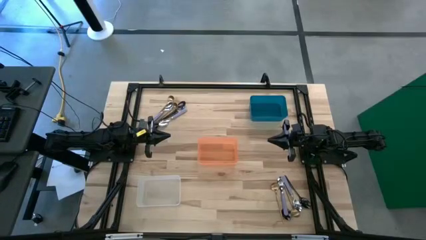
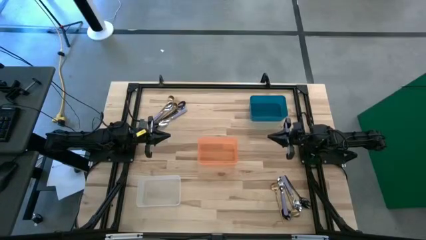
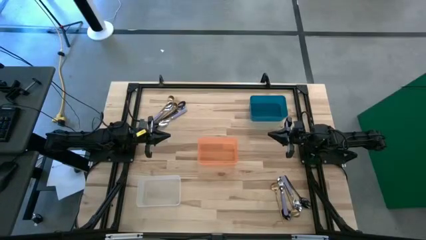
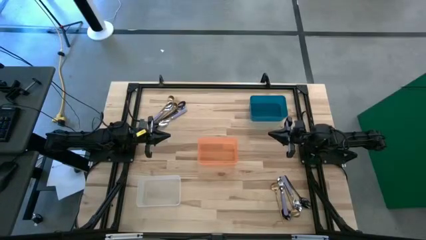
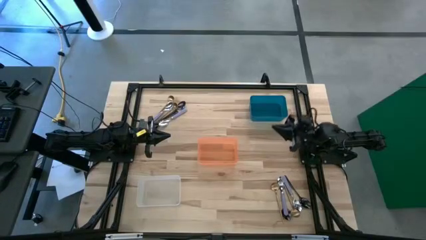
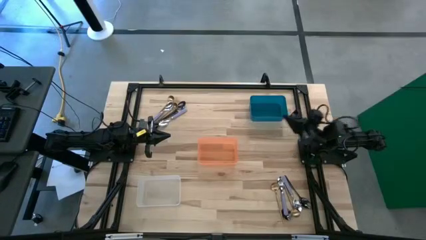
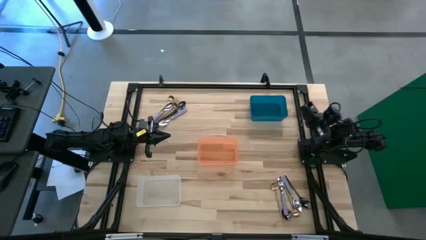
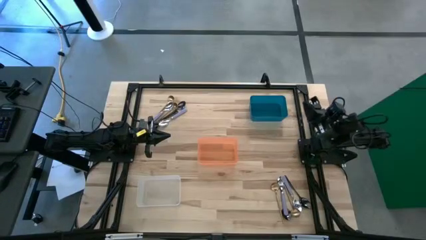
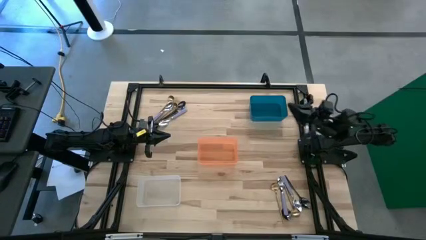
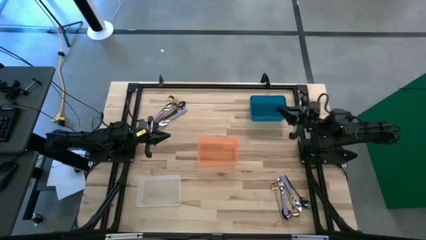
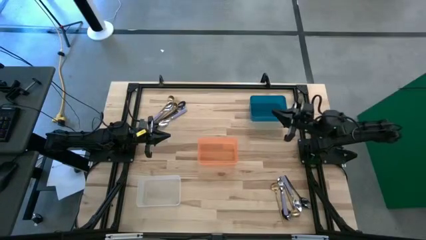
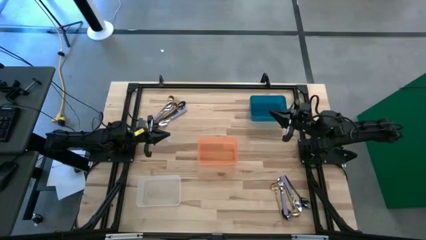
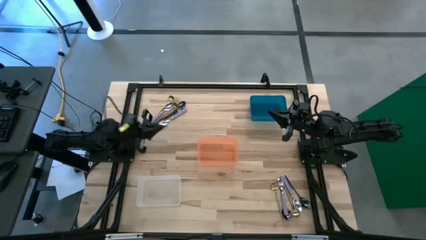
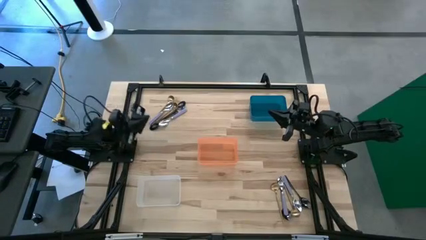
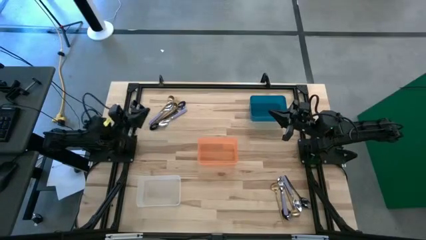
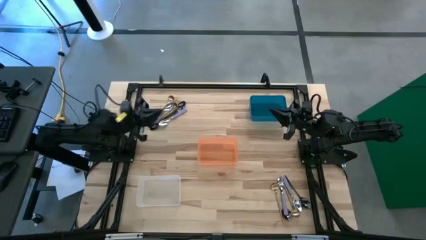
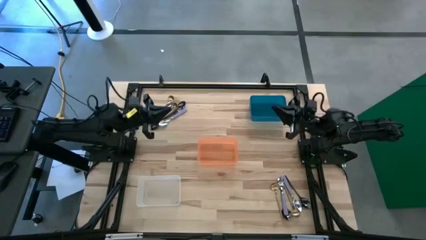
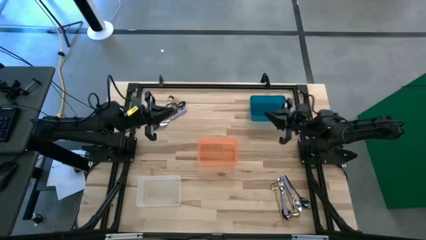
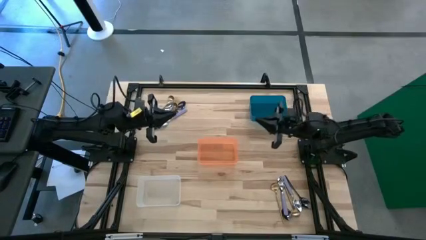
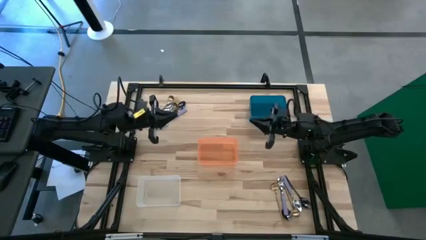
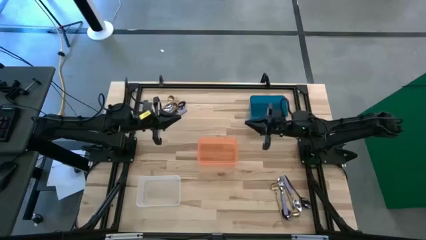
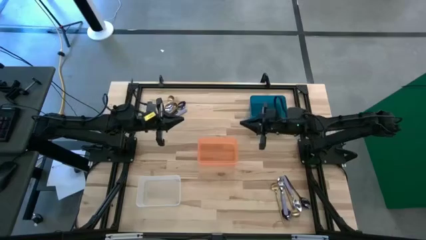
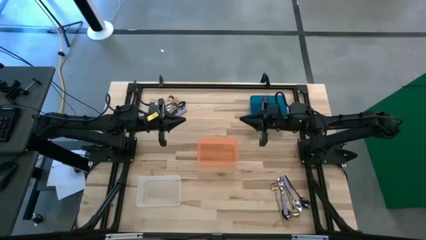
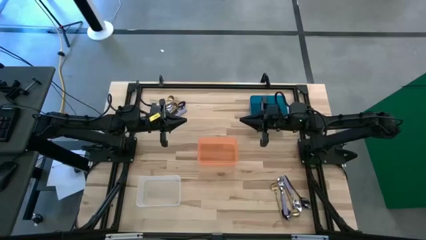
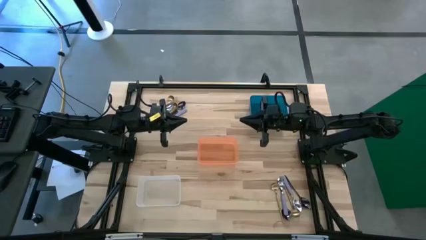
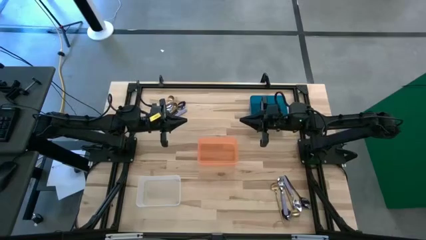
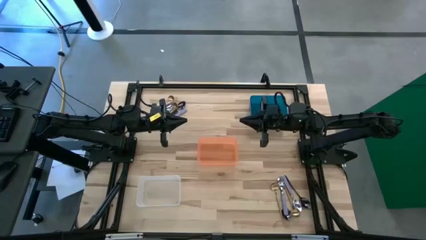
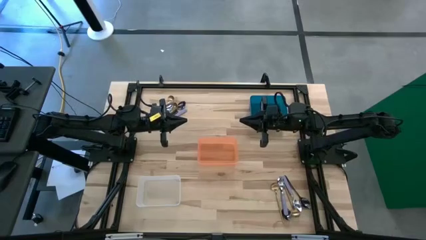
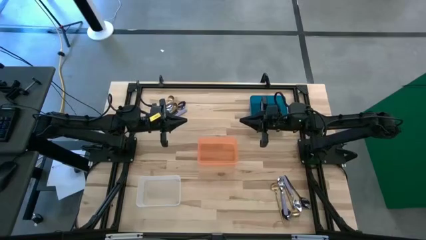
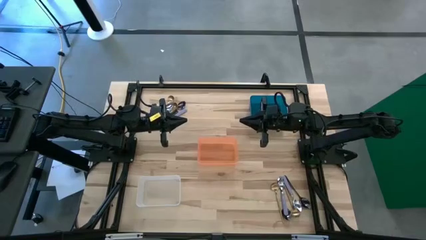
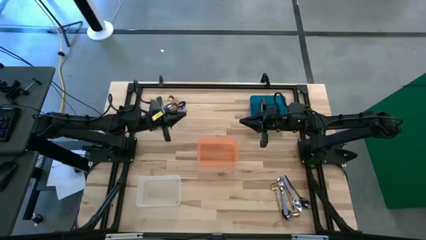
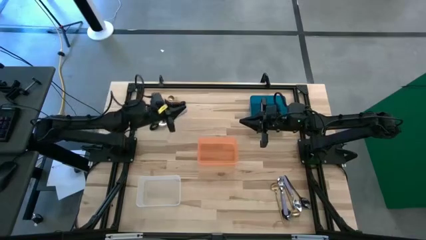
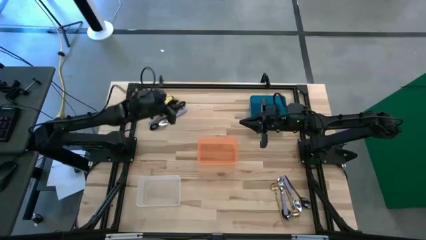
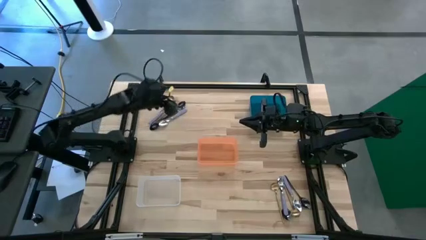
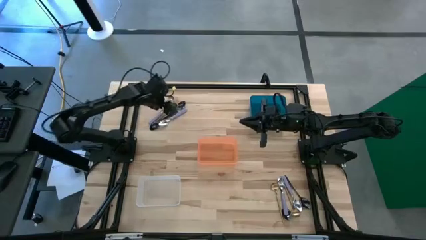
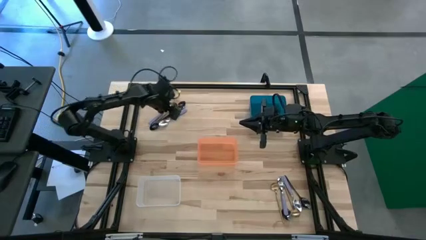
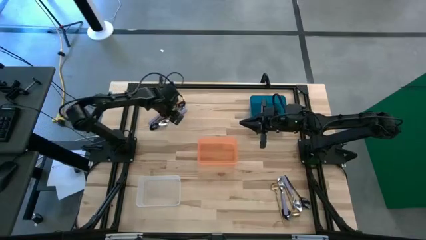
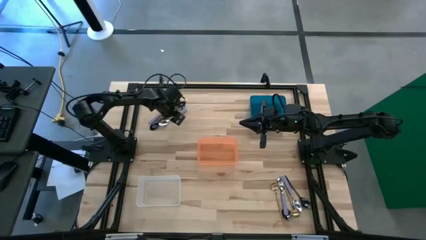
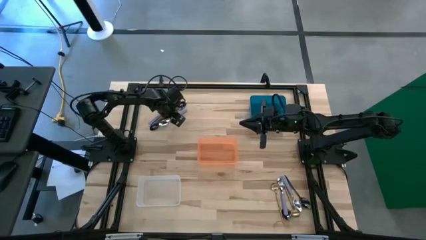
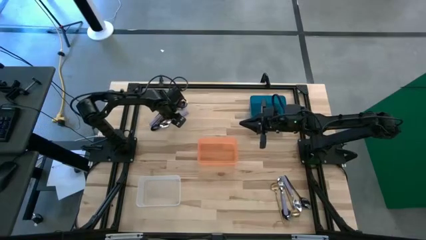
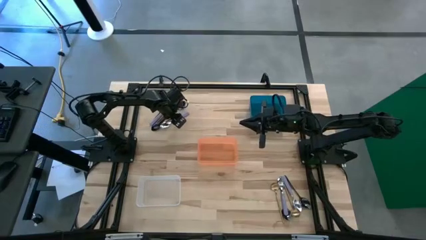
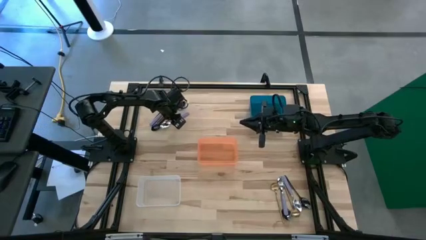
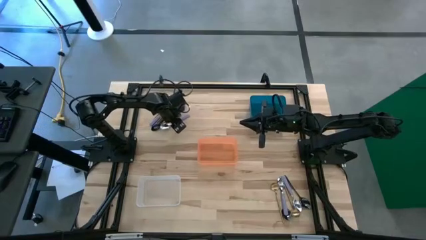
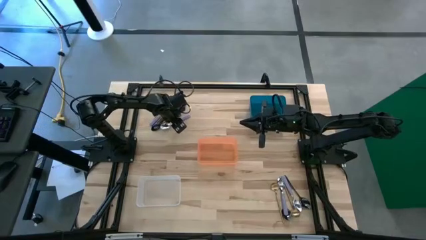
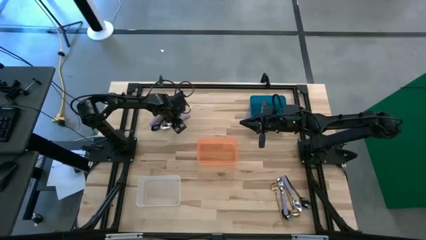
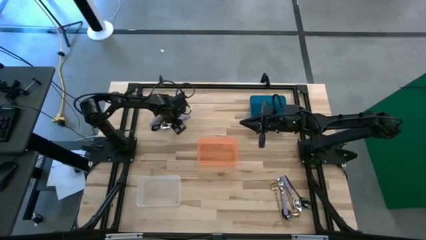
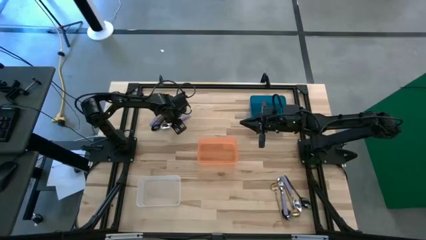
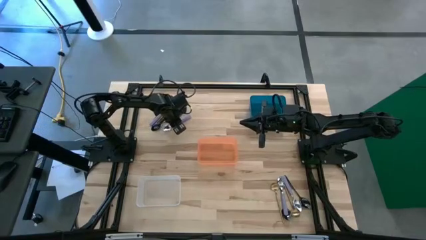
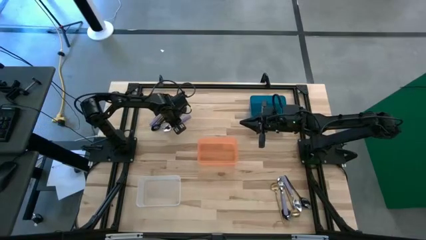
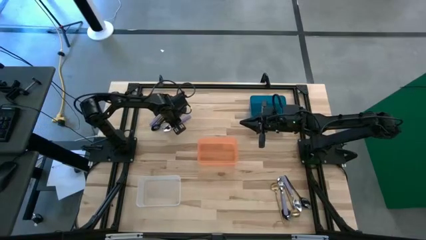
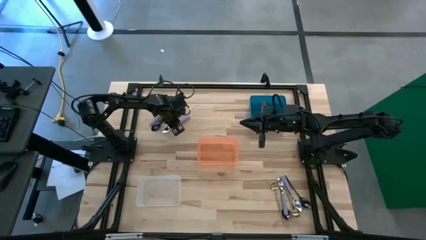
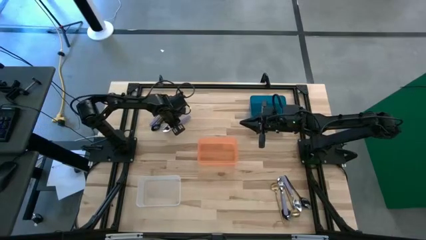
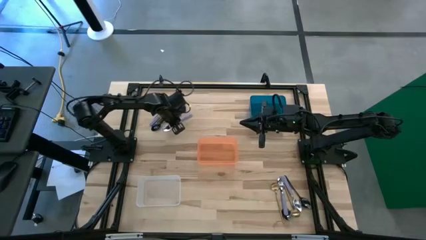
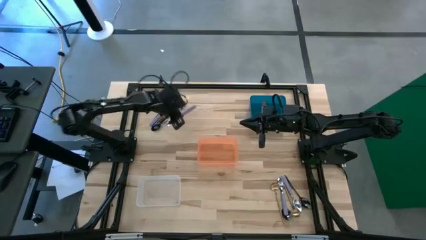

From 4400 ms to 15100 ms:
Task: Sort silverware by color (type)
Put the top right violet spoon into the blue bin

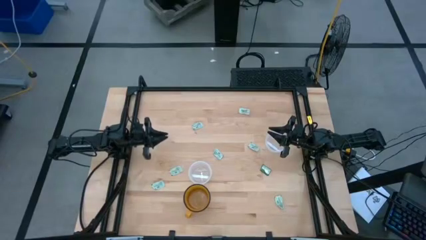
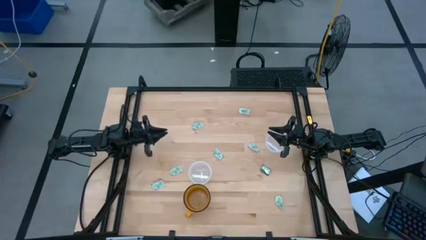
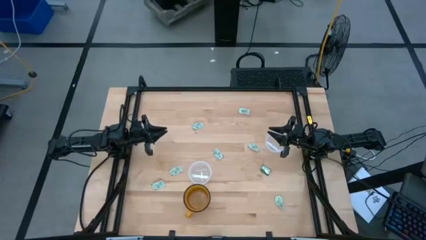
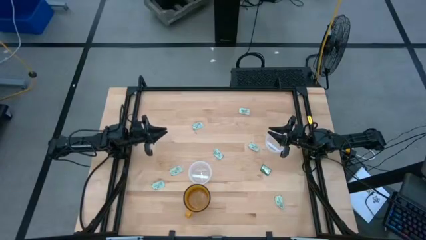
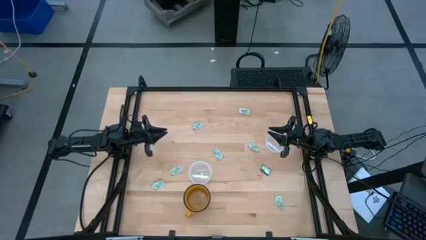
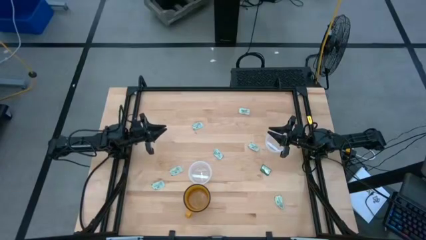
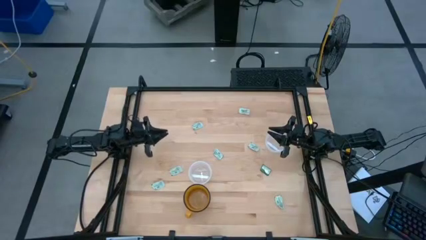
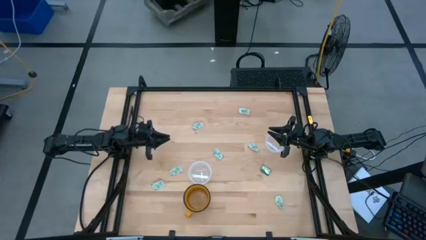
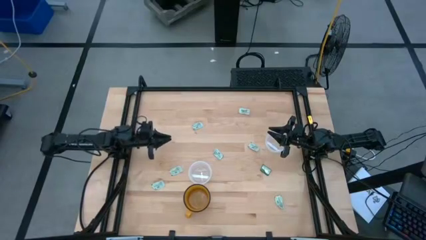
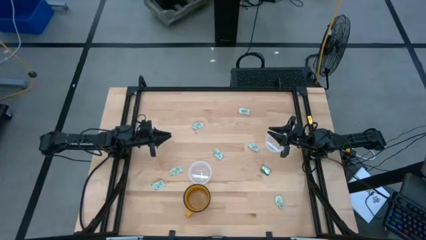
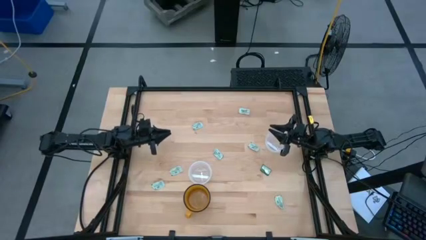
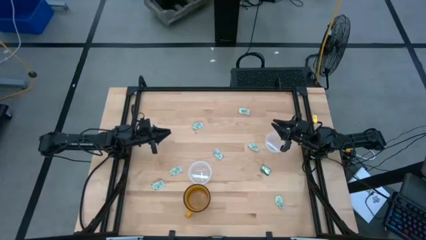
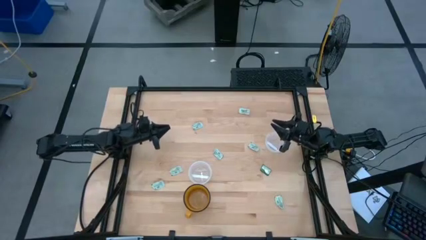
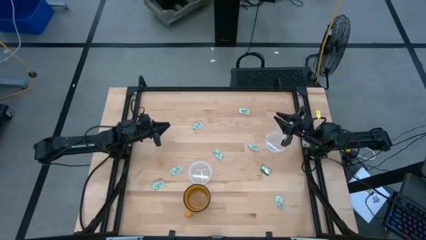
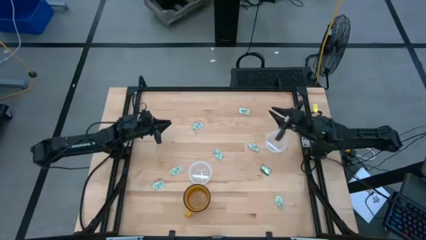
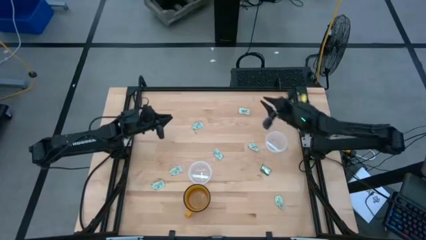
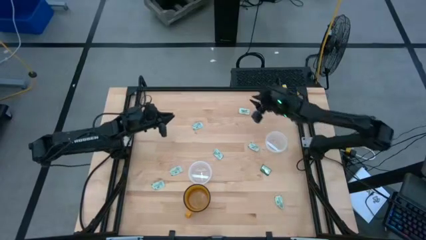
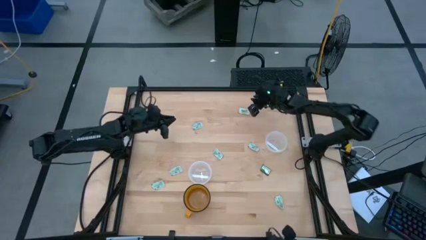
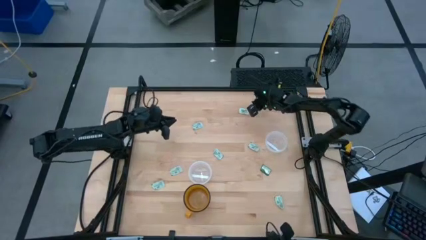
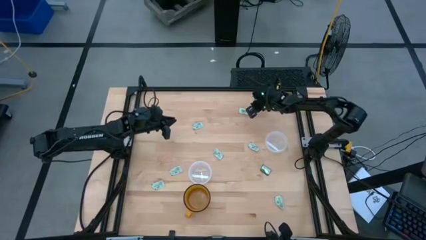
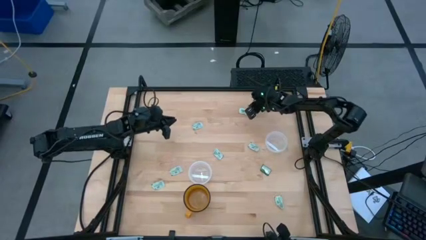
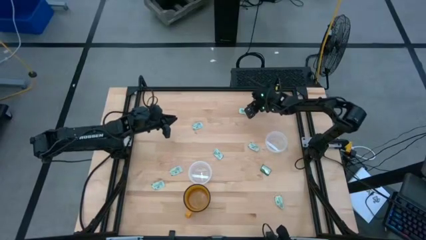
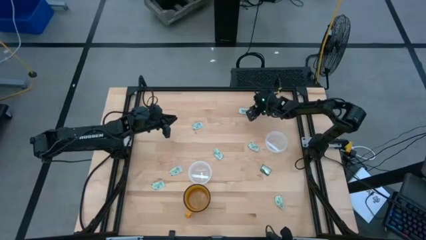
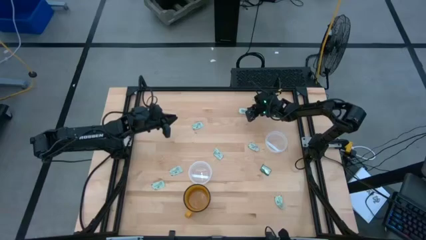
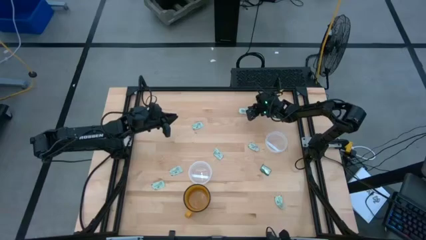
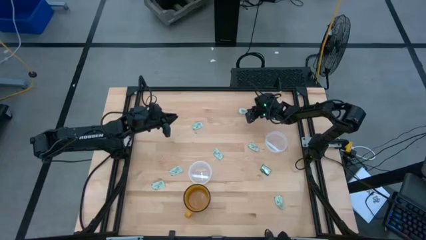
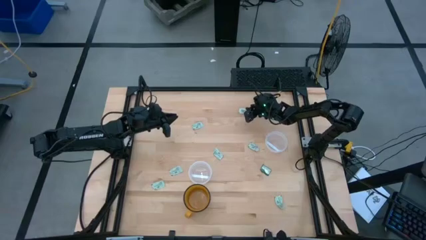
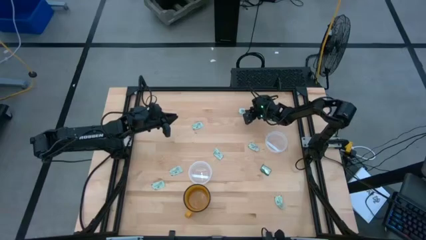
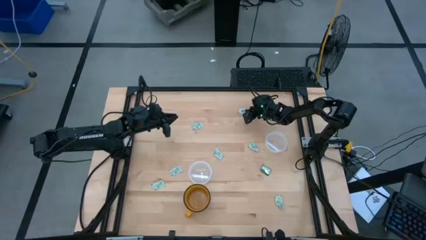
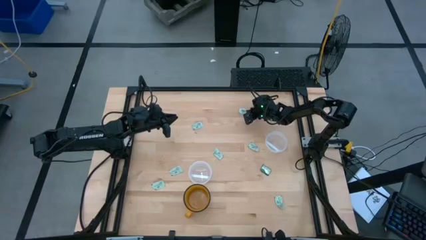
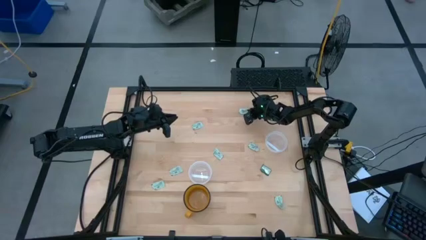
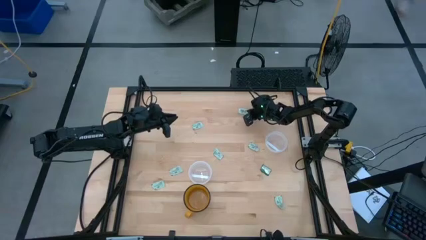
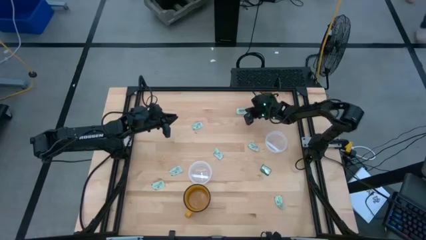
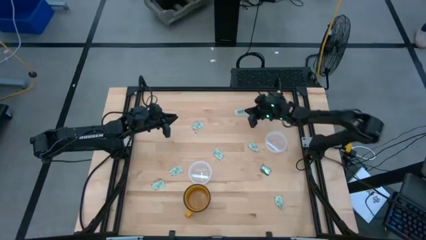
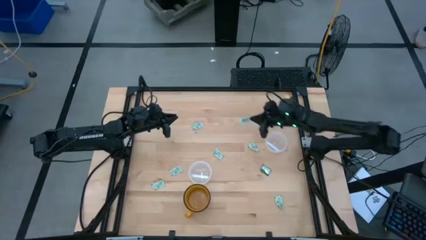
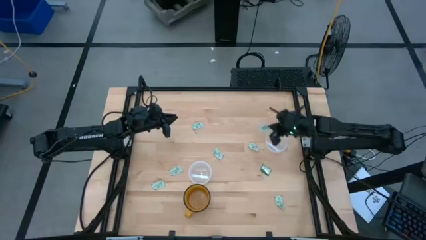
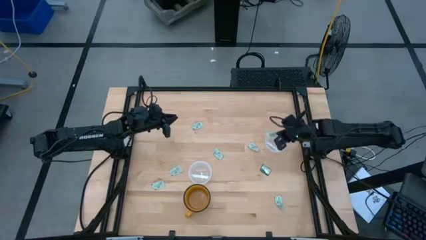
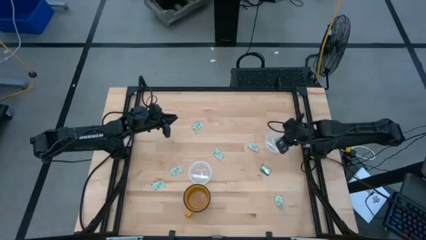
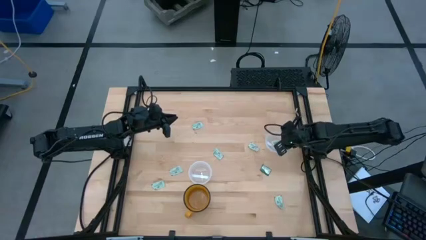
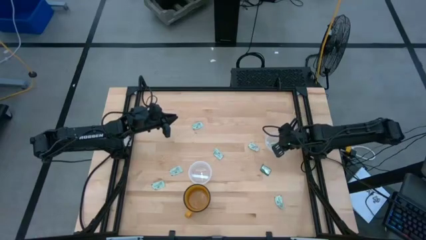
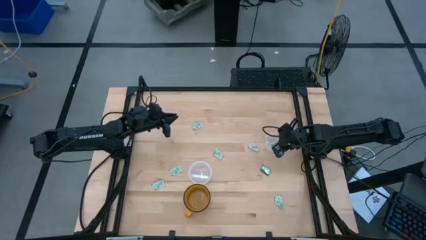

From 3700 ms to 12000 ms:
Task: Pick and place items into bin
Put the stevia packet into the right transparent bin
